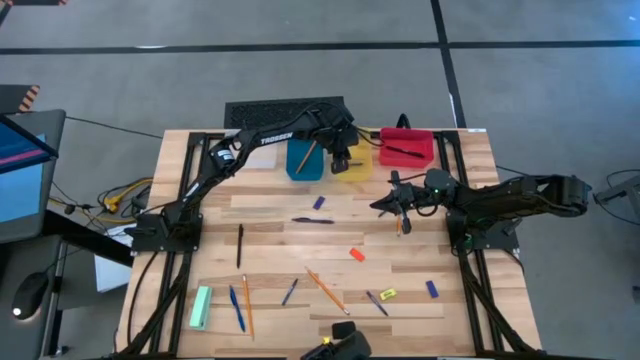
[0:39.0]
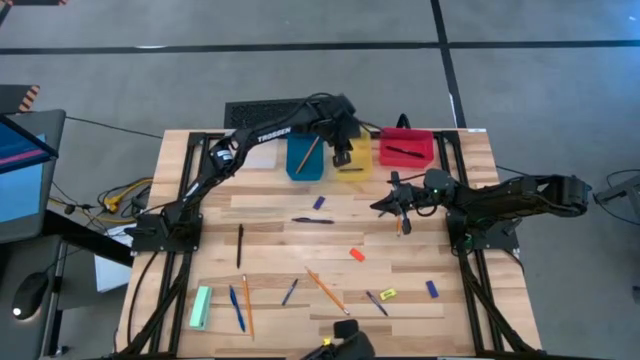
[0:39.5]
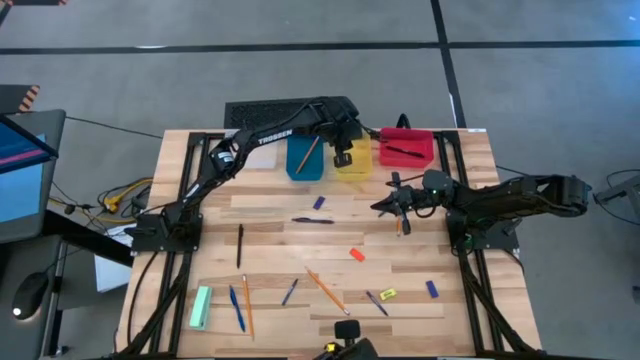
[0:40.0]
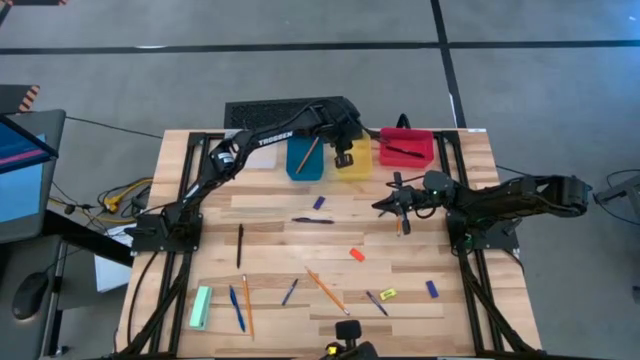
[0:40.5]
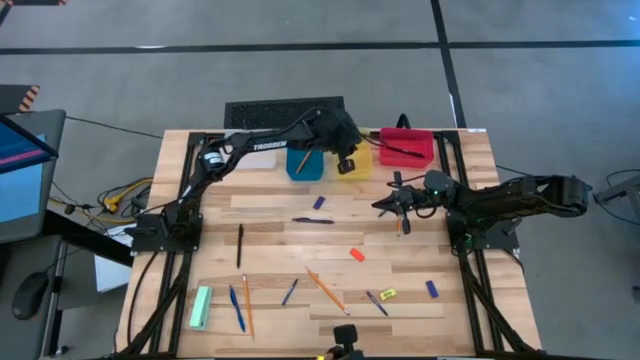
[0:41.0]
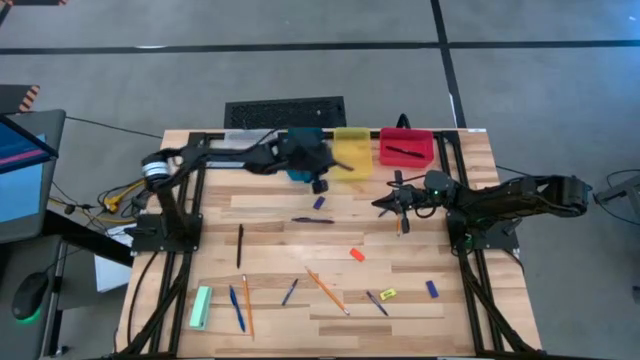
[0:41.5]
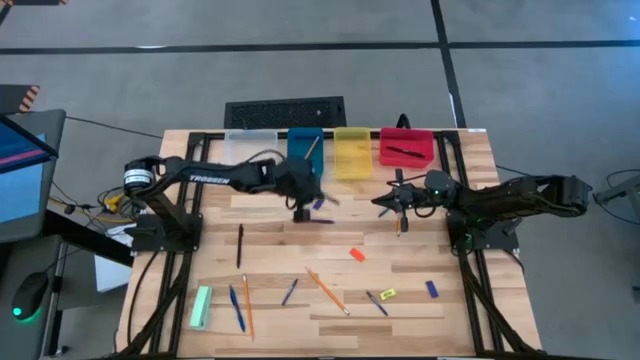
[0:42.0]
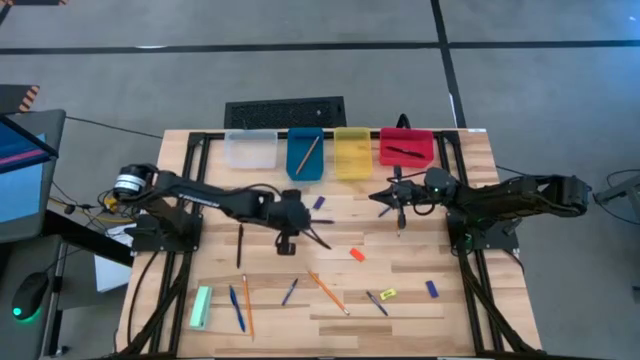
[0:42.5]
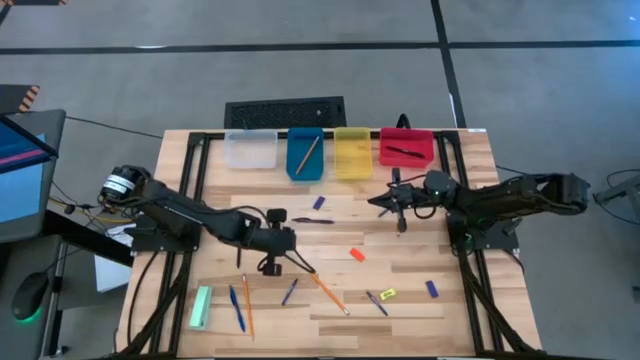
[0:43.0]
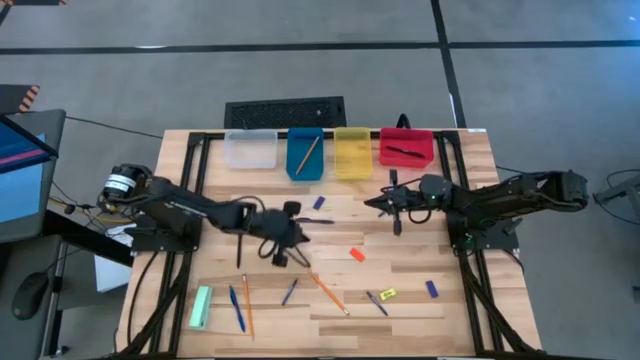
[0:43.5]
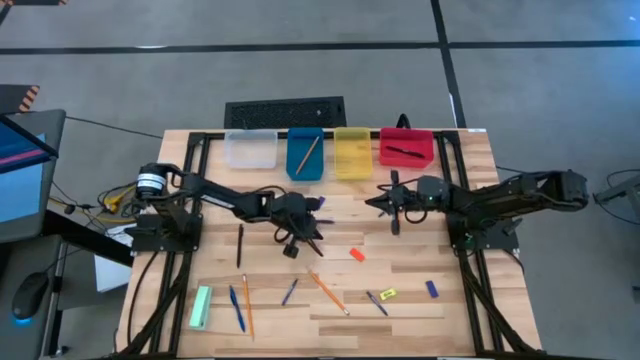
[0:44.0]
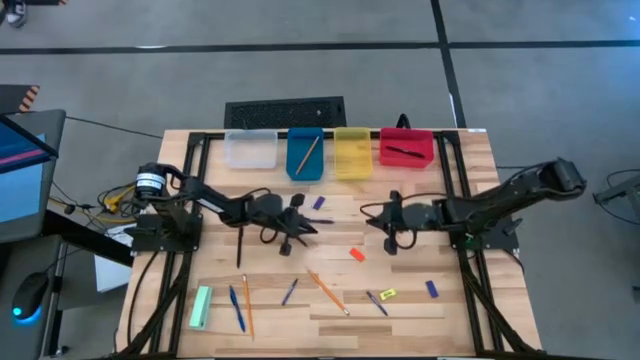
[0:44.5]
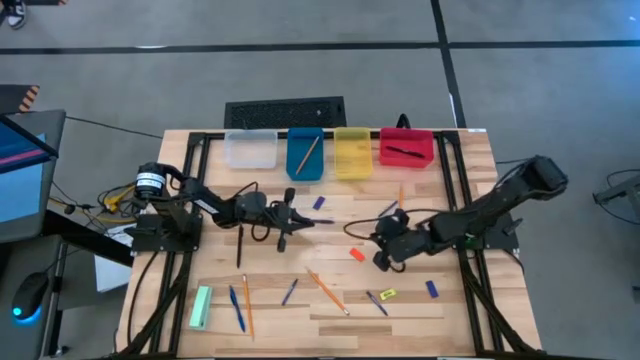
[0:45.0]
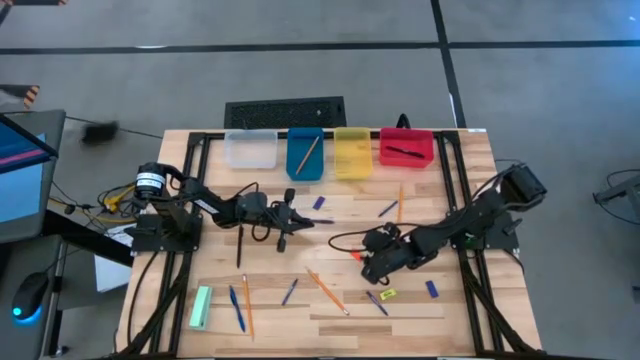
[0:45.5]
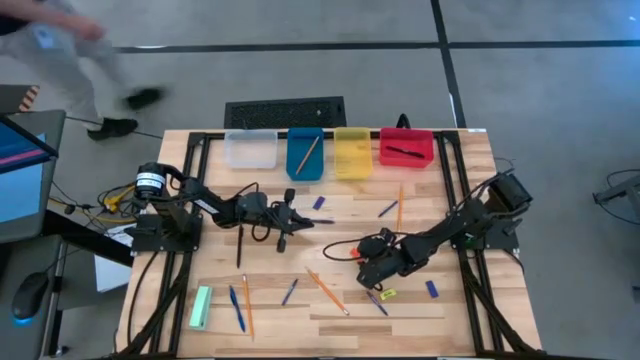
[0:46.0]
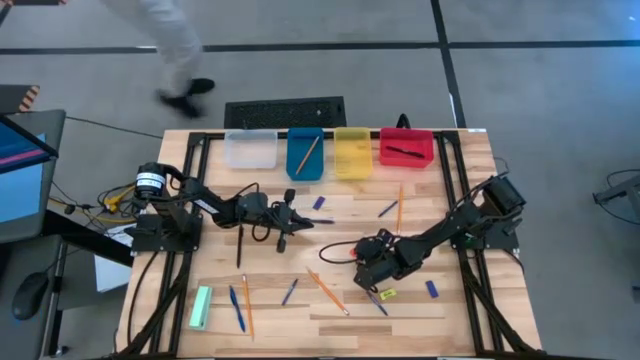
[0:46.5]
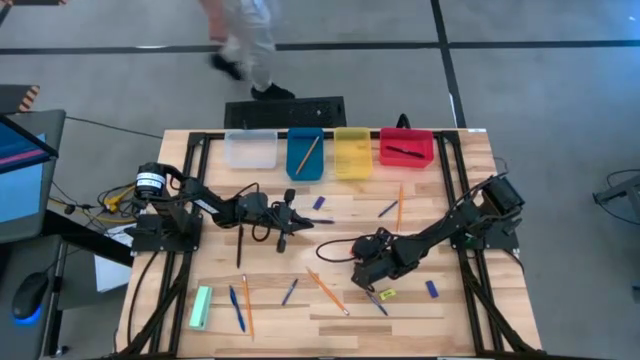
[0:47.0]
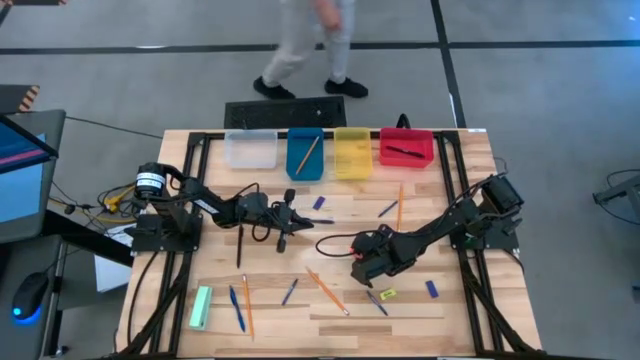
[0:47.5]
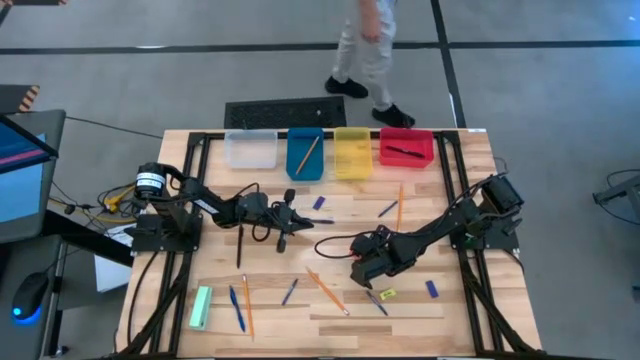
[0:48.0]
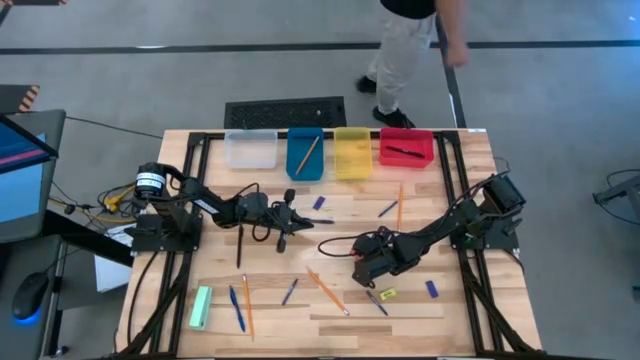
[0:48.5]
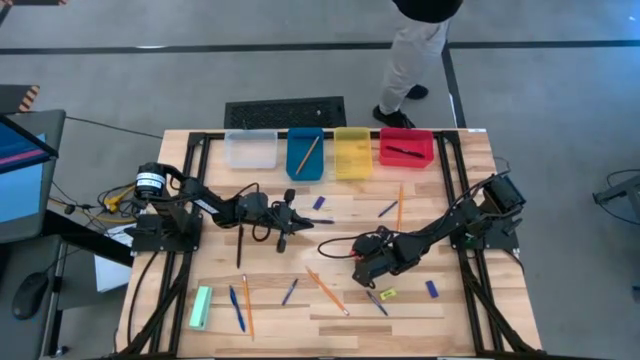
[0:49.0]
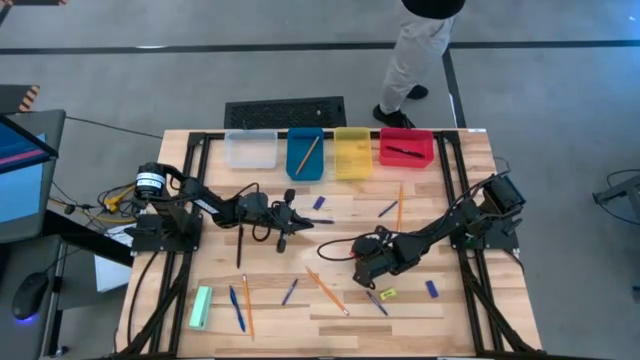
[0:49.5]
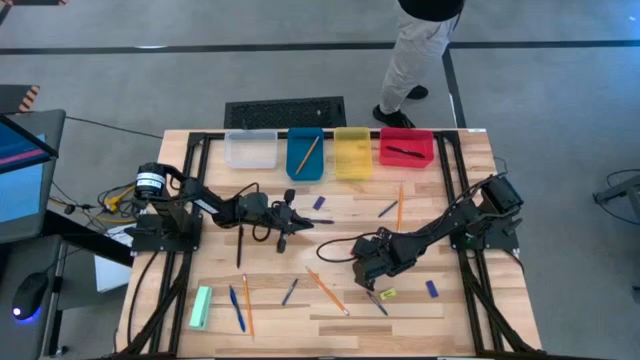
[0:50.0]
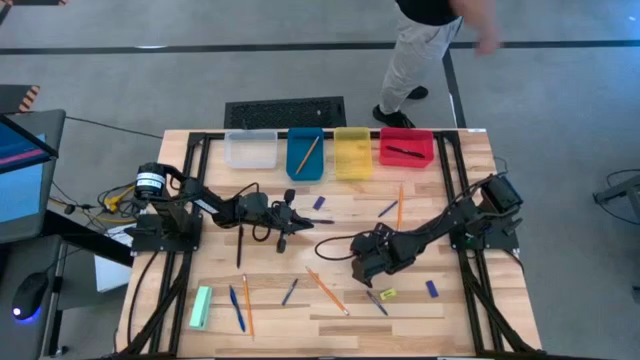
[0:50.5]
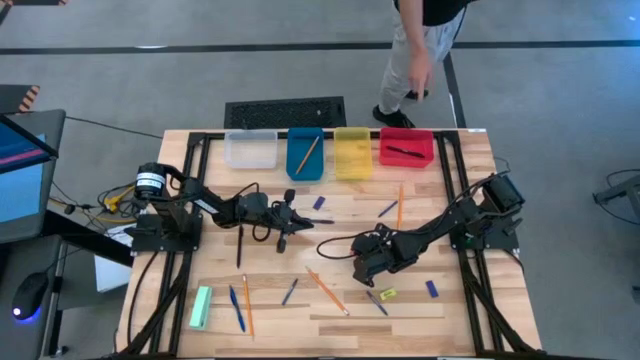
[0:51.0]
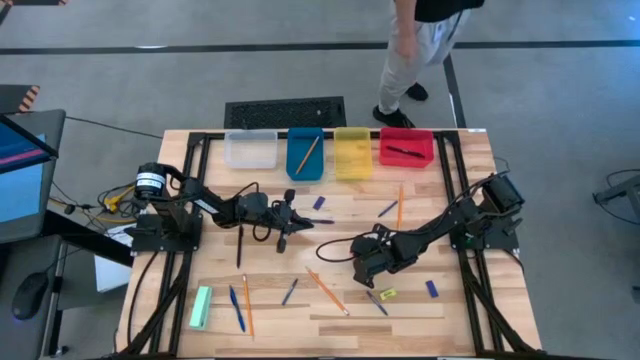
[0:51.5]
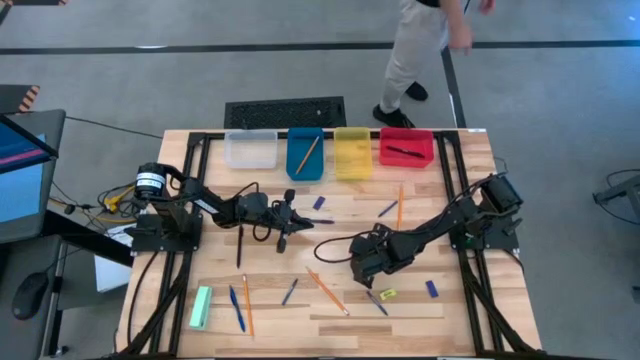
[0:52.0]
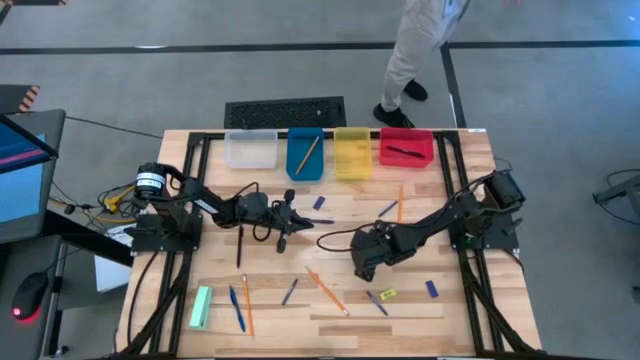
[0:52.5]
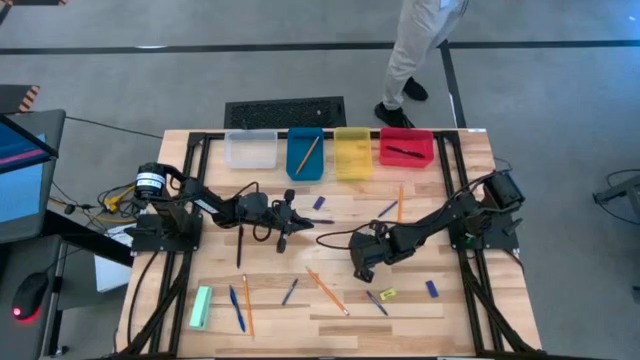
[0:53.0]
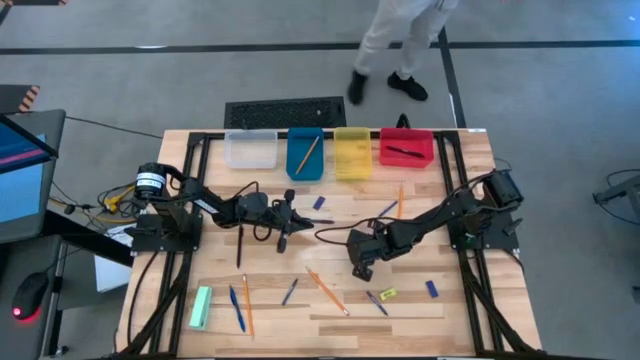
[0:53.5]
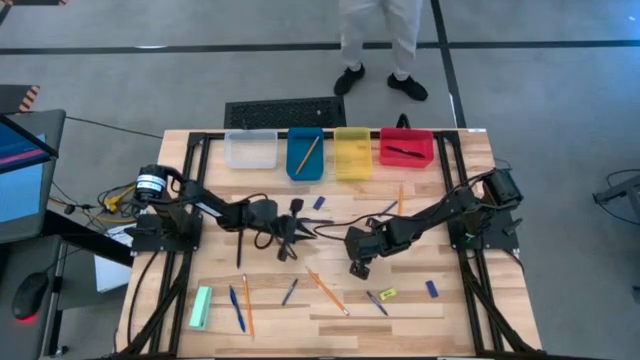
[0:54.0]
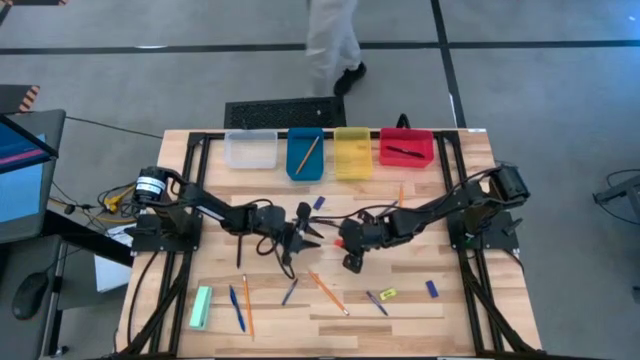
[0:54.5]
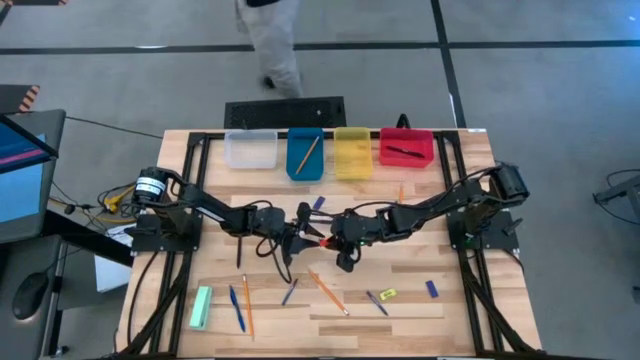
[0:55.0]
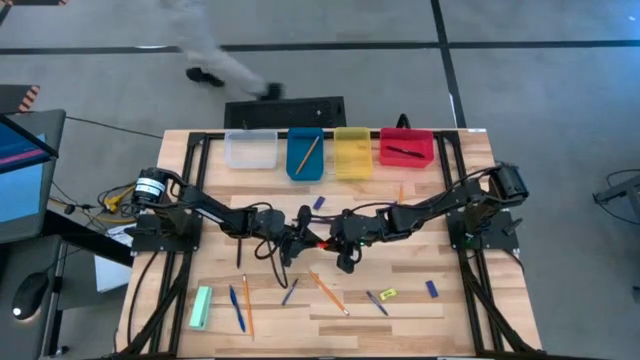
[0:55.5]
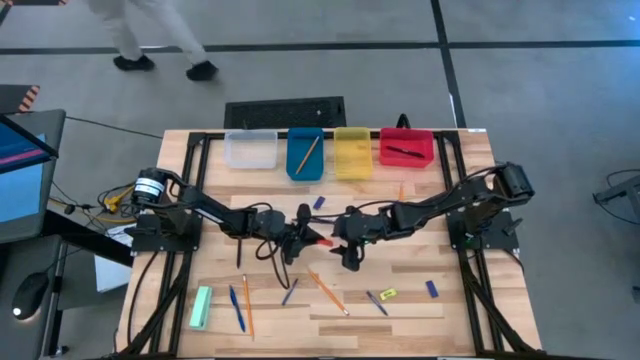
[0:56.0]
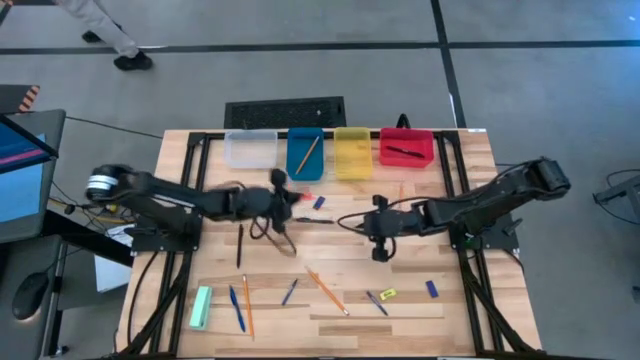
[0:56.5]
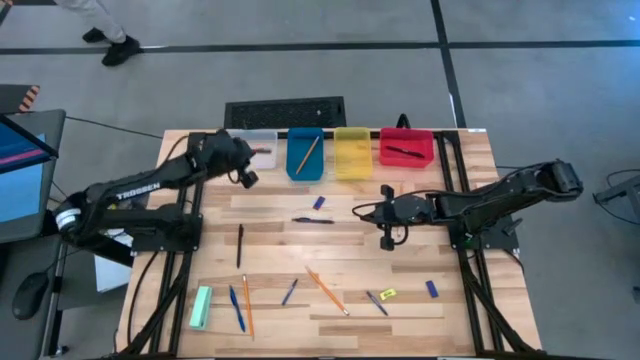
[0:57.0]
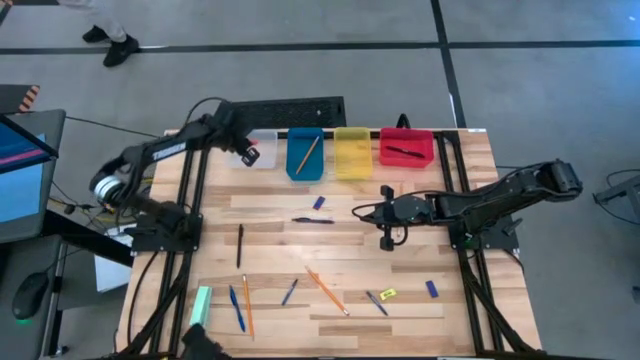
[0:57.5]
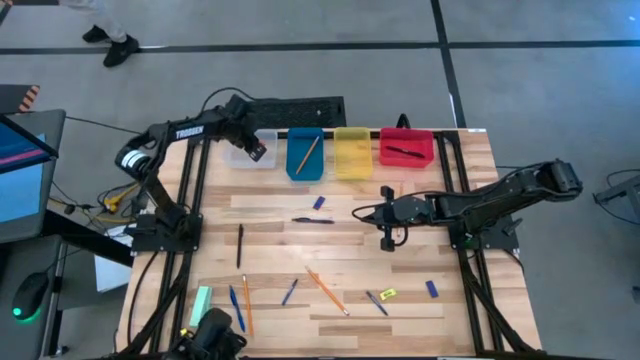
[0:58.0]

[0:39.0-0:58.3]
Task: Sort crayons/erasers/pens/pencils in bins
Put the orange eraser into the transparent bin

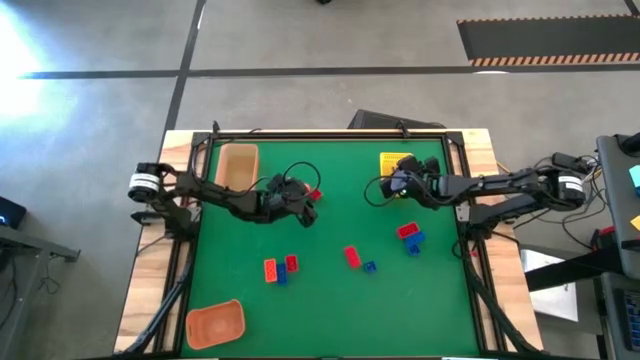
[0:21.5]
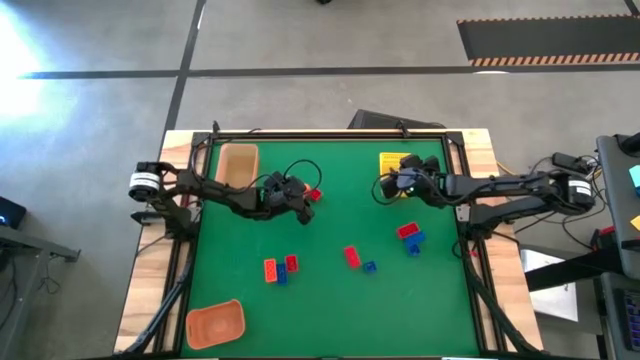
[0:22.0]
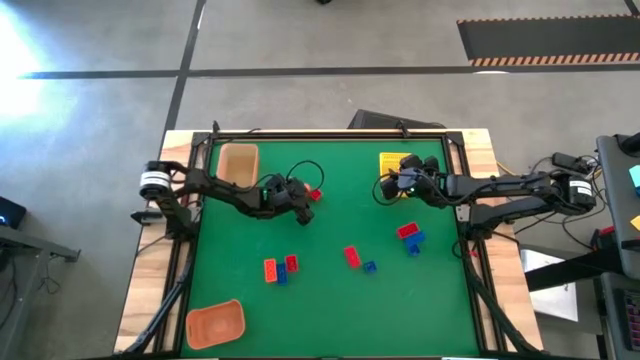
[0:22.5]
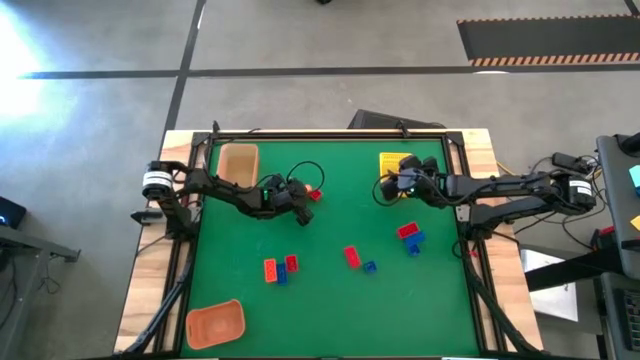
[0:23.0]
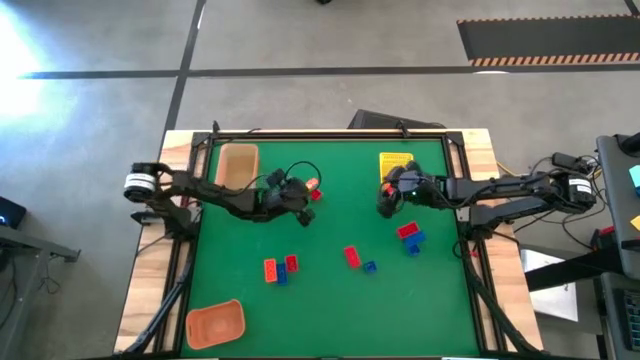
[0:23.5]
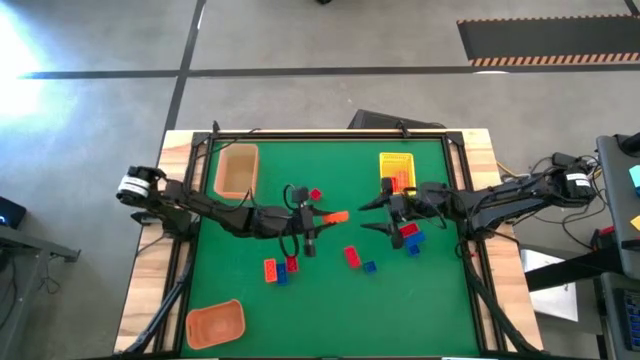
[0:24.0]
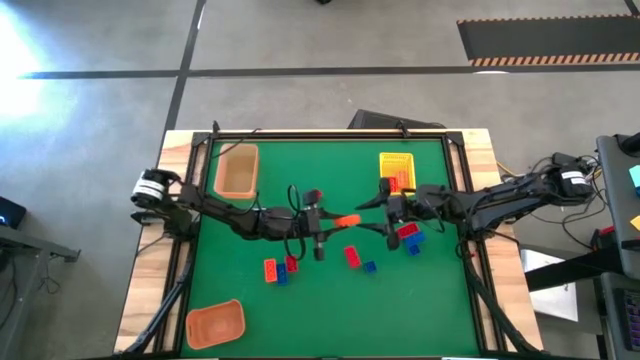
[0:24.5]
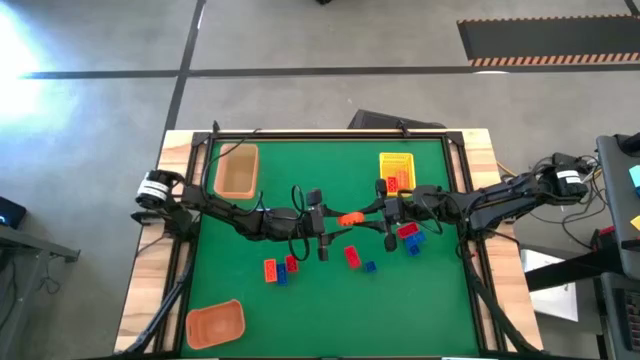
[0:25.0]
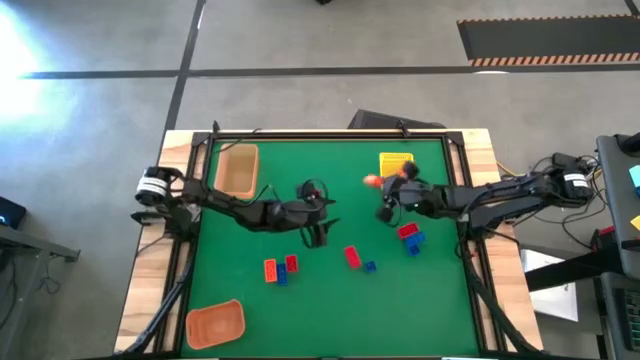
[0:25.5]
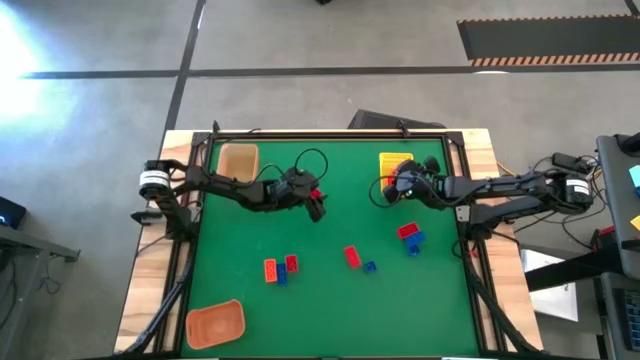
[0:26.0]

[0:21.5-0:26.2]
Task: Sort & place blocks by color
Put the orange game piece into the yellow bin
